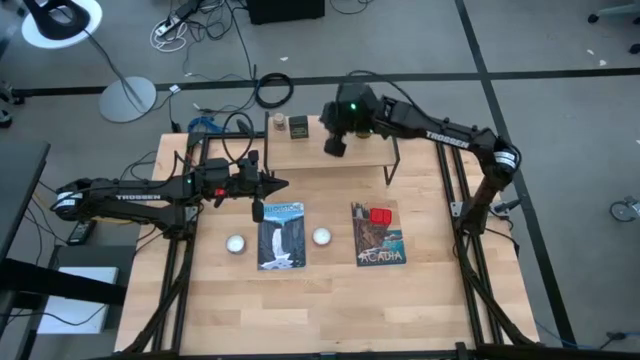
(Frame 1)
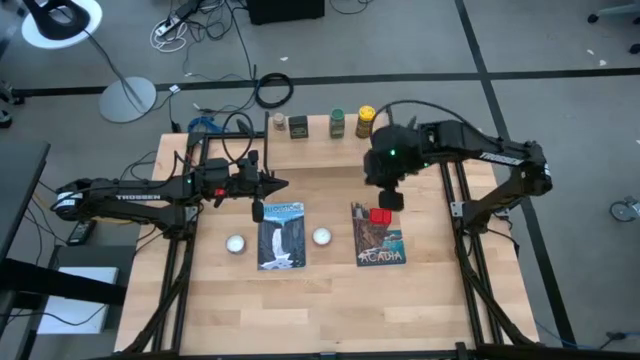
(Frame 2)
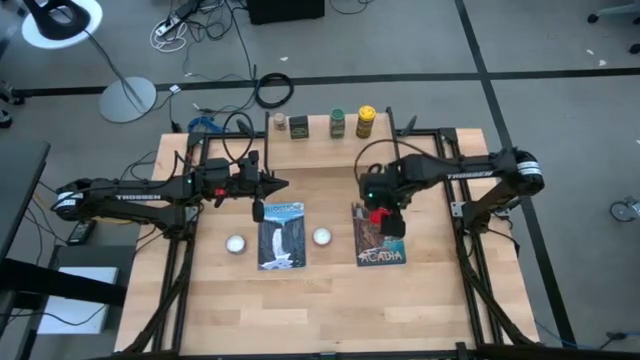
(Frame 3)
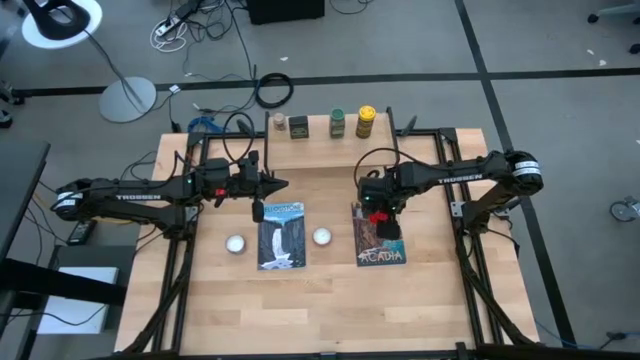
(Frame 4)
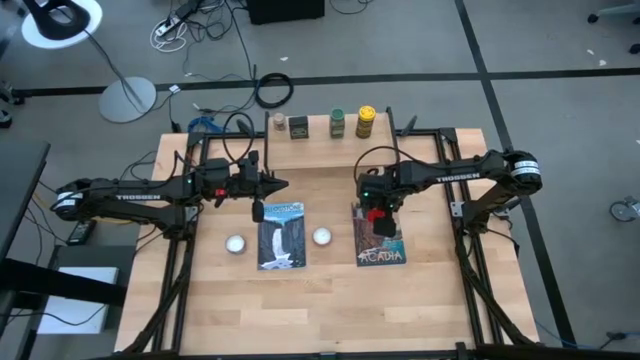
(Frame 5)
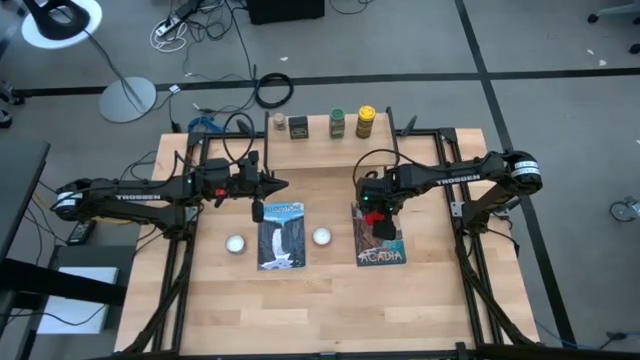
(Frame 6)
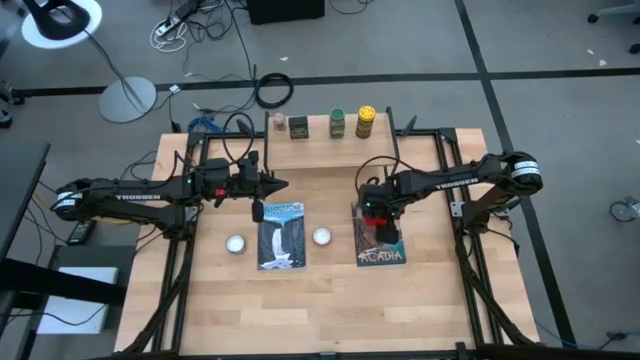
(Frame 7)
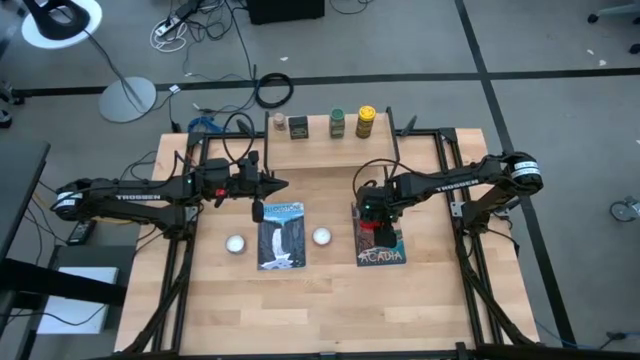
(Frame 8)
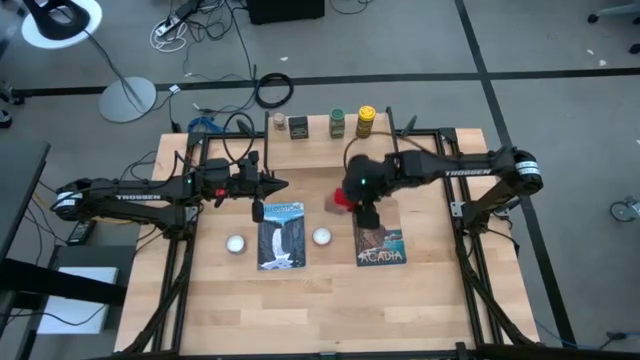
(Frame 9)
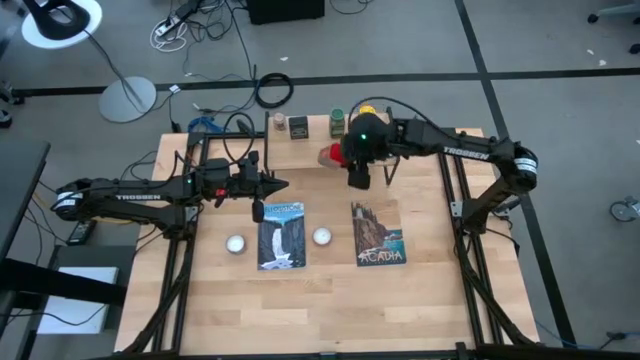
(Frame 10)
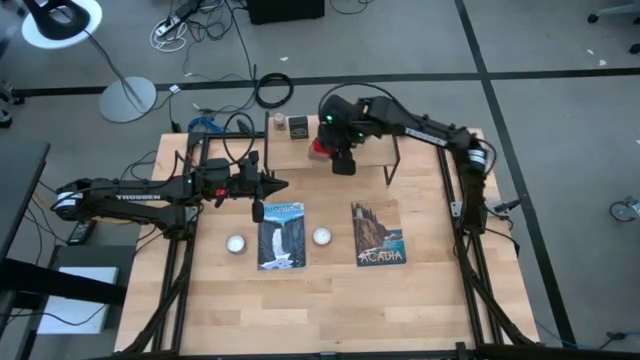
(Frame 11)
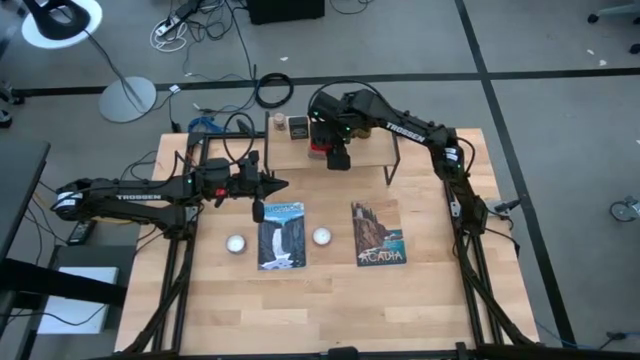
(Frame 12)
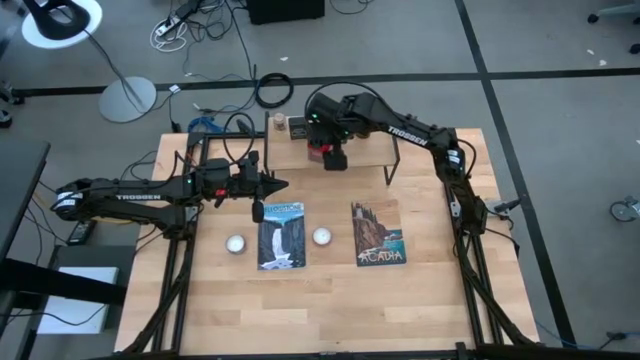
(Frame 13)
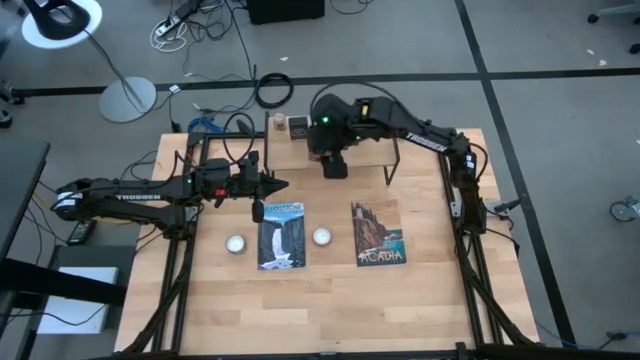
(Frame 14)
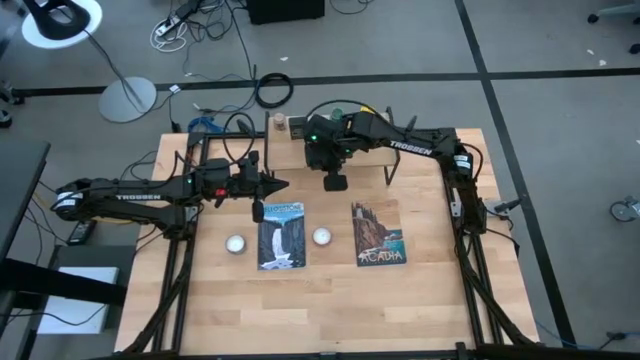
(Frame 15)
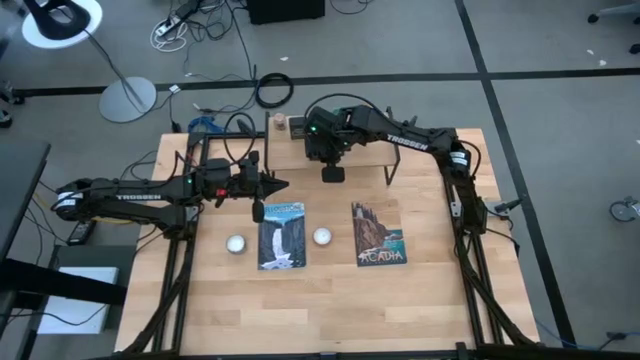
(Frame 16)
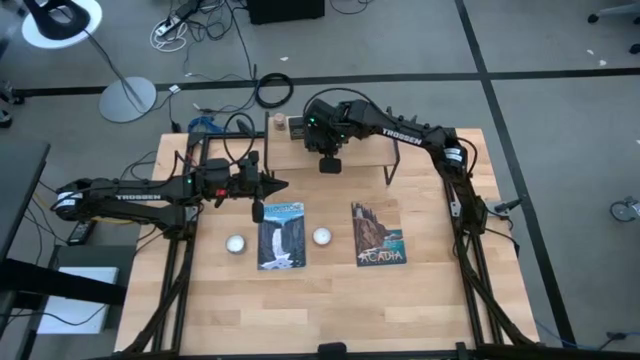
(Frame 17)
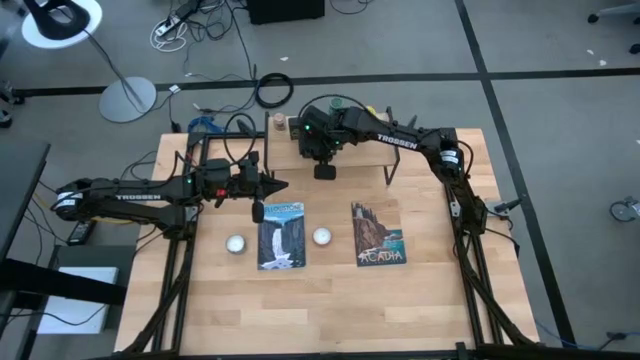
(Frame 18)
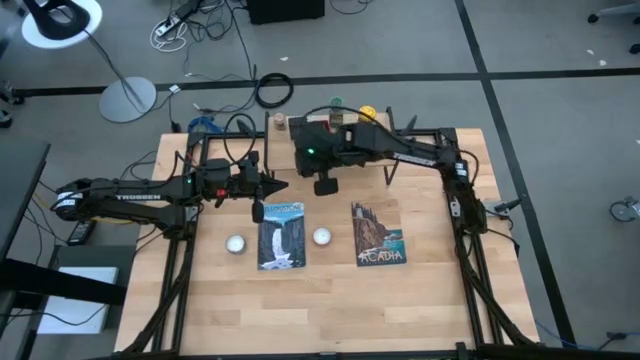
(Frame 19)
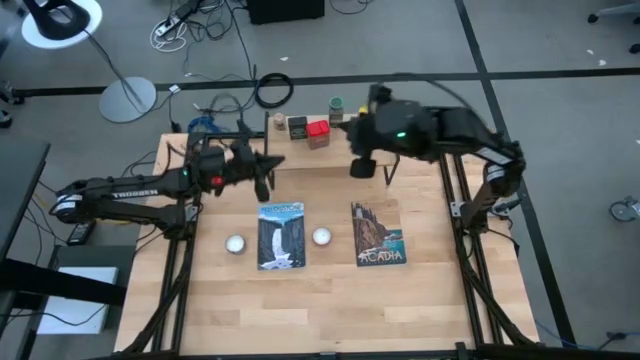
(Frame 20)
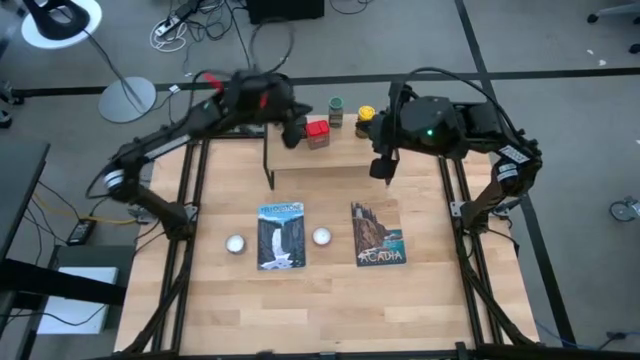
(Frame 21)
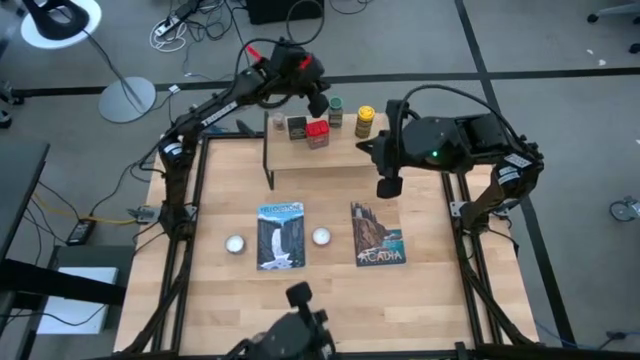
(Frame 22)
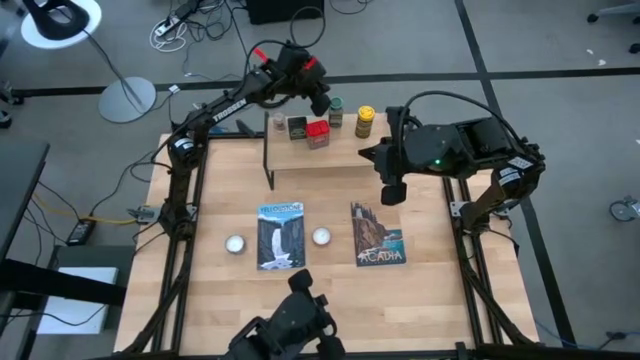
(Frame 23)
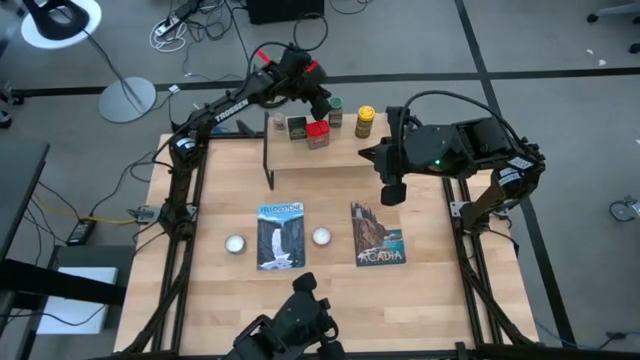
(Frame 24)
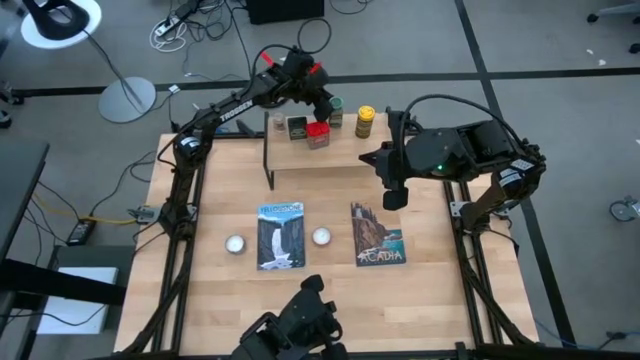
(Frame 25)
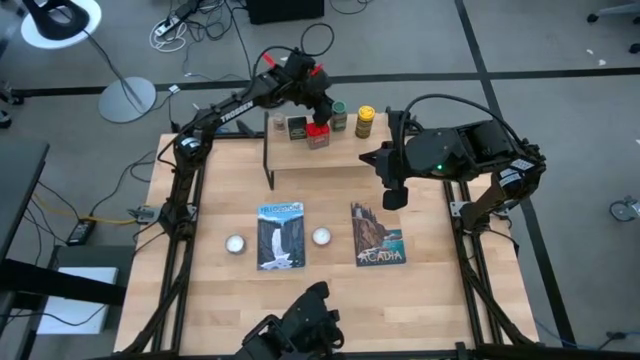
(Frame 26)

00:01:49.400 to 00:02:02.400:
Task: Shelf spices
Put the red spice on the shelf between the black and green spices

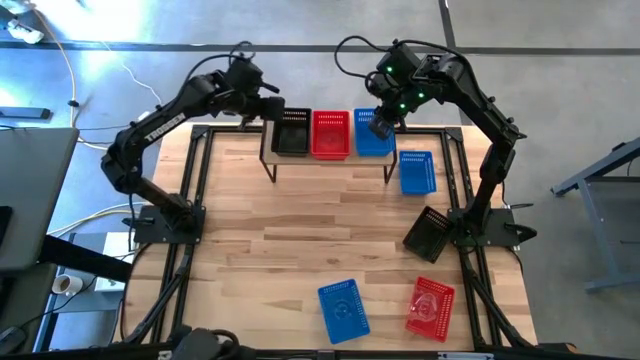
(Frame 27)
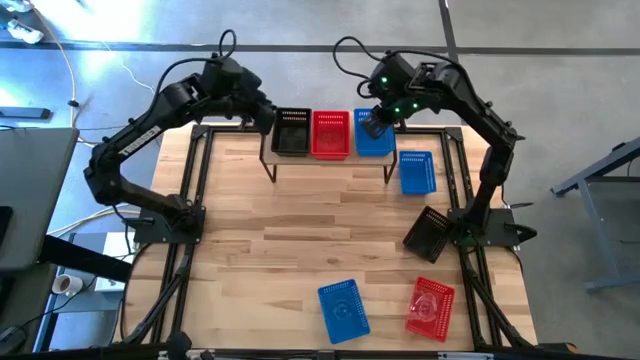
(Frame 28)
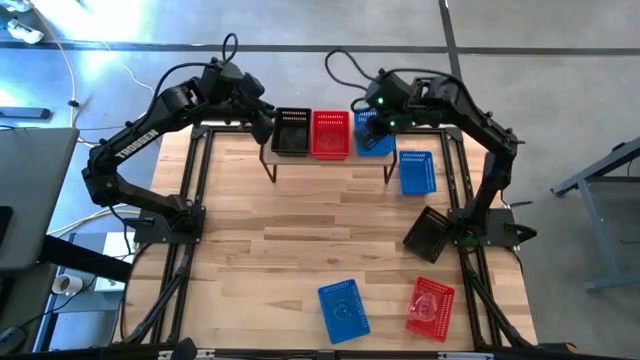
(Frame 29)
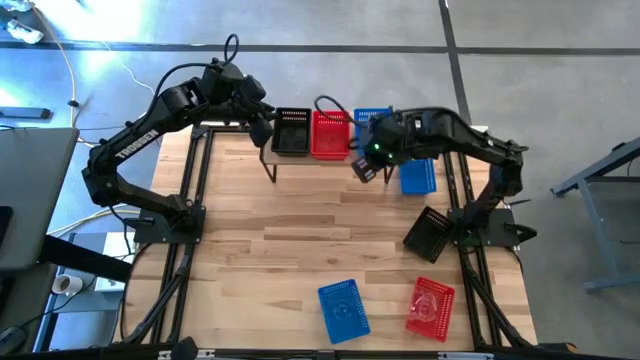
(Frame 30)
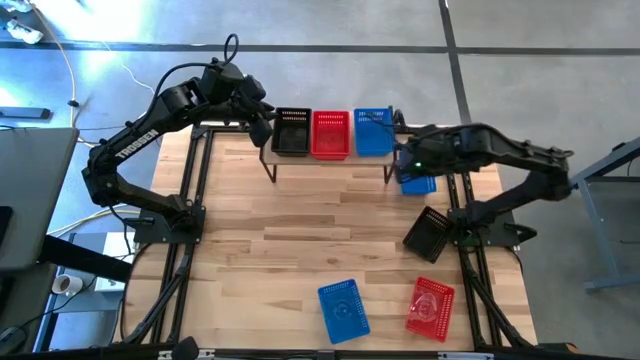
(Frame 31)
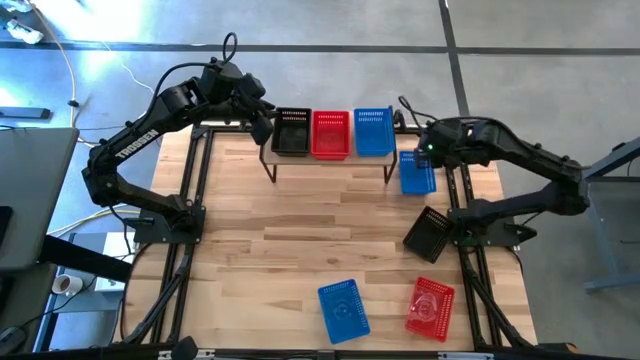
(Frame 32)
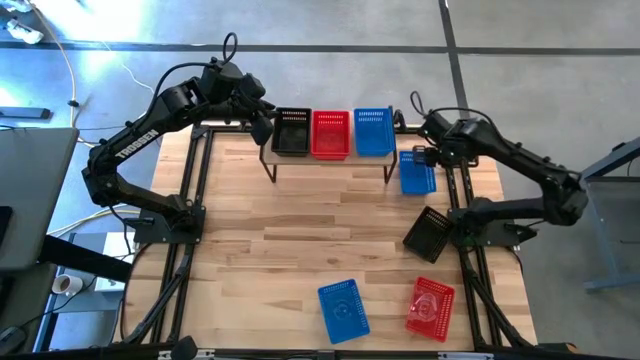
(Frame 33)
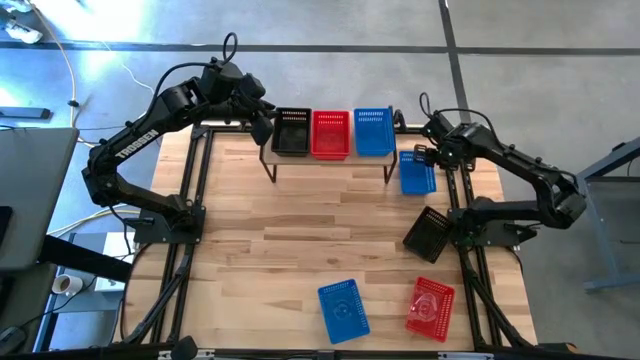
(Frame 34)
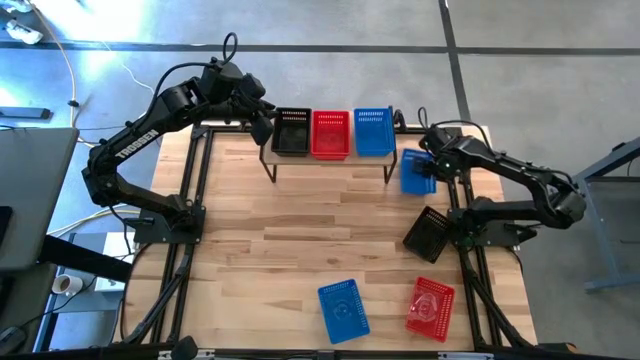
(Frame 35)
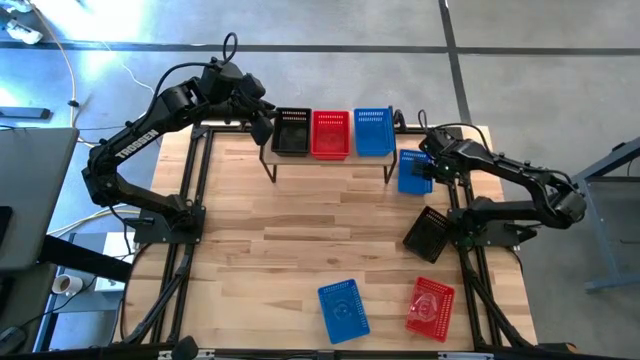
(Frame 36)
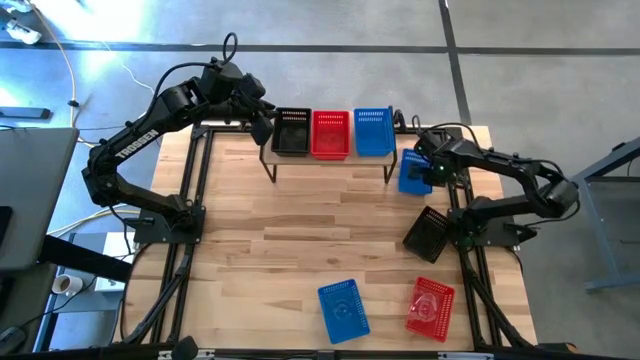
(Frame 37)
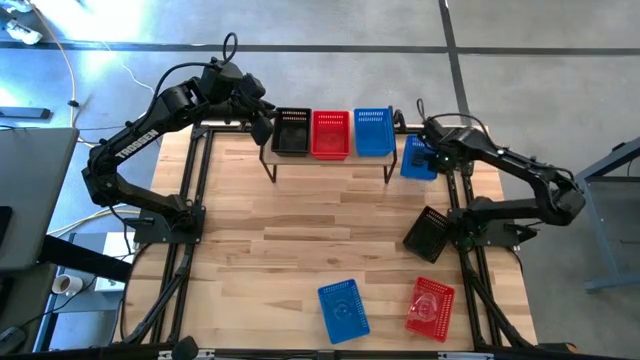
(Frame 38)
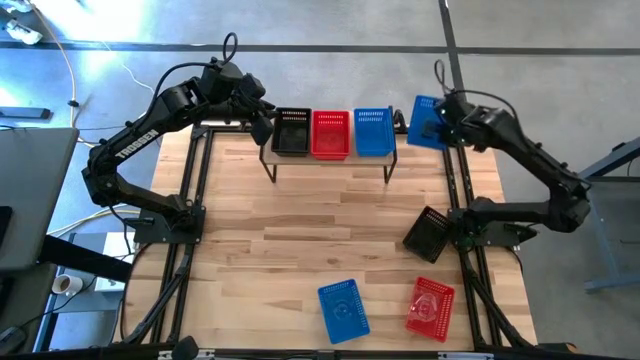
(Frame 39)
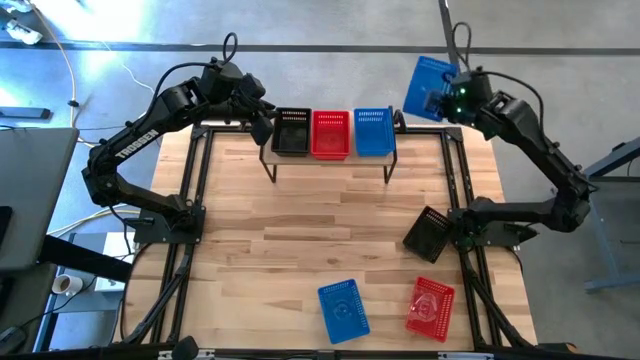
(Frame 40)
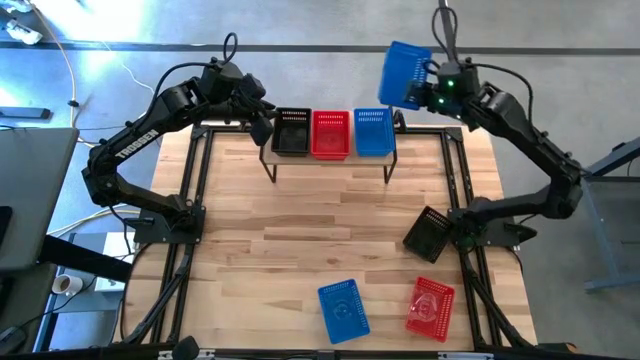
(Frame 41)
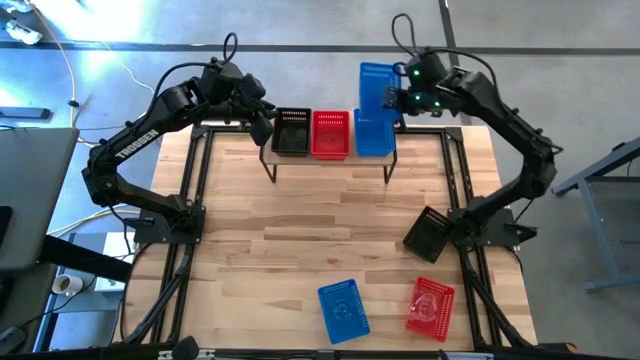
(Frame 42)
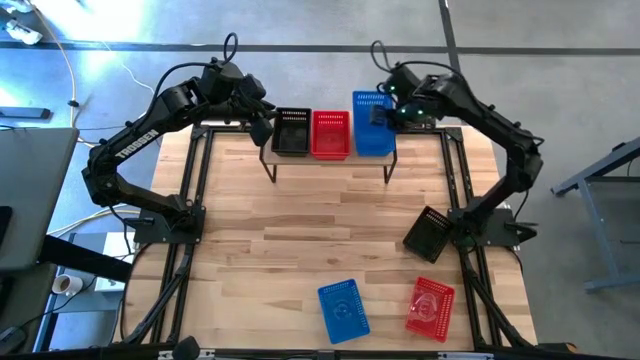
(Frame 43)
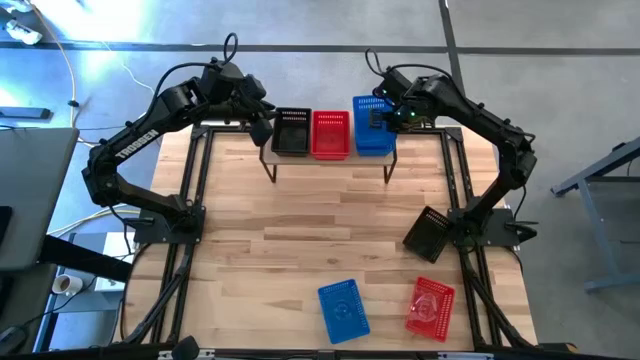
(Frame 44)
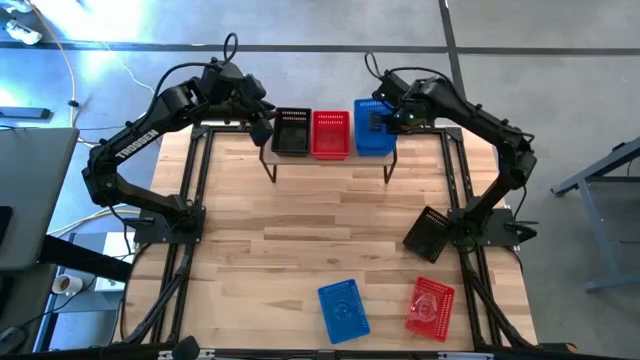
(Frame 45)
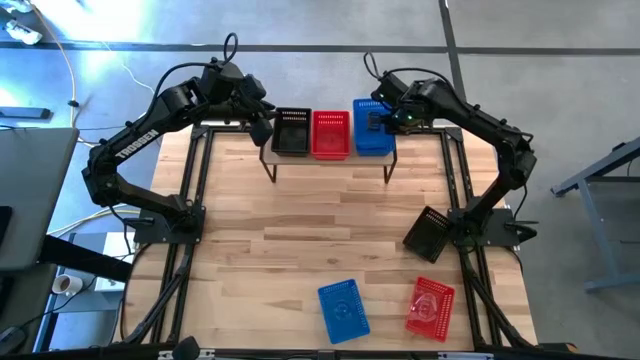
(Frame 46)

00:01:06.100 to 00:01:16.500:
Task: Stack baskets on shelf by color
Stack the top blue bin on top of the blue bin on the shelf
